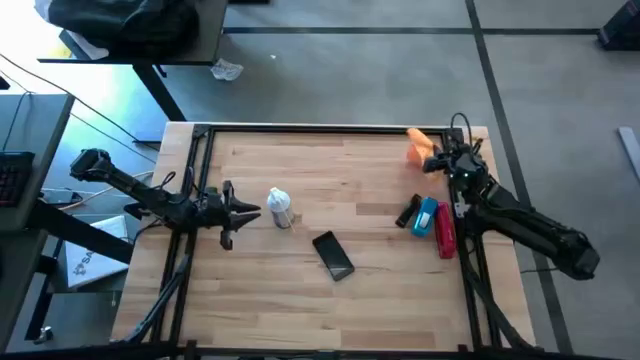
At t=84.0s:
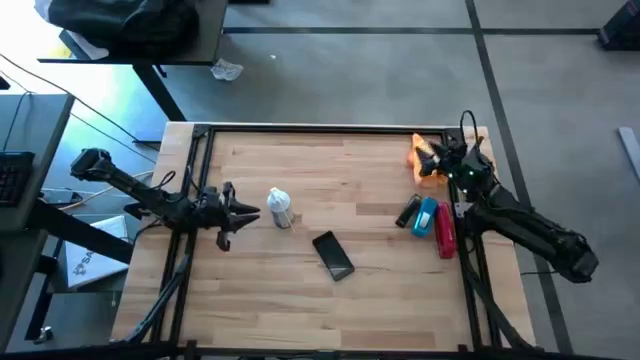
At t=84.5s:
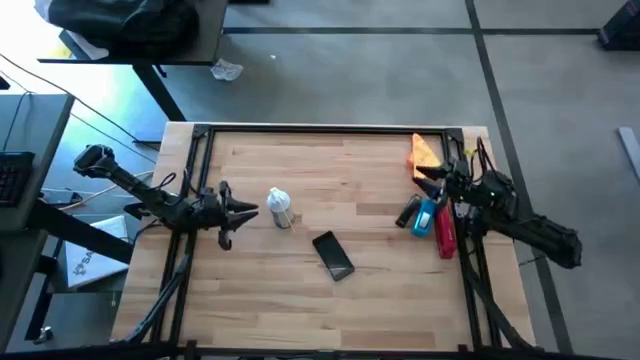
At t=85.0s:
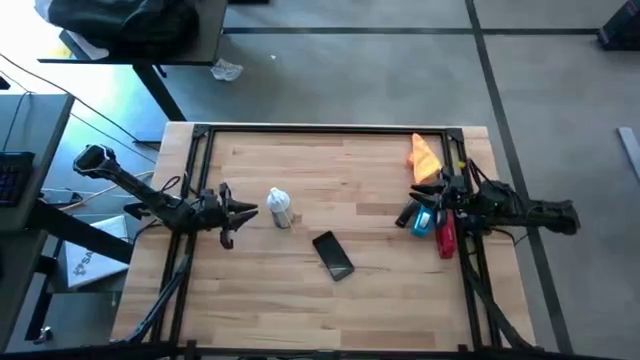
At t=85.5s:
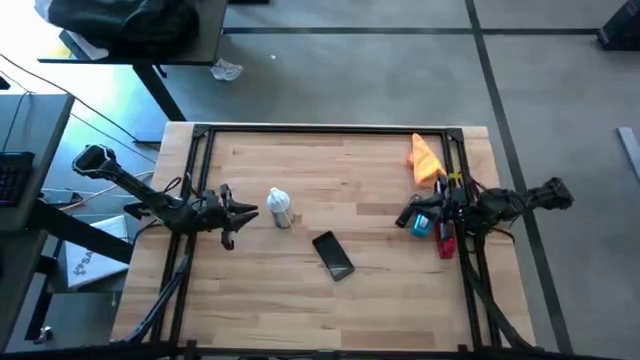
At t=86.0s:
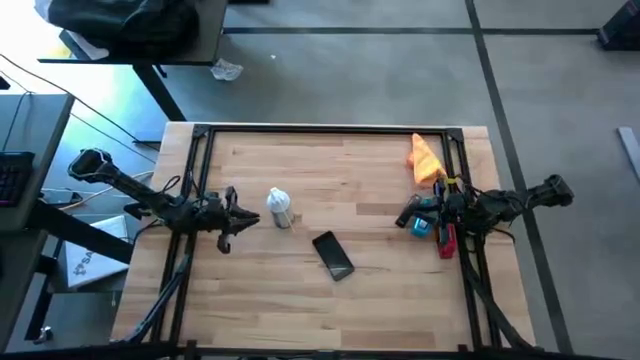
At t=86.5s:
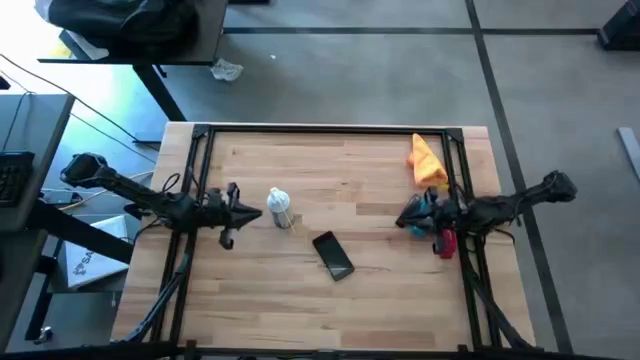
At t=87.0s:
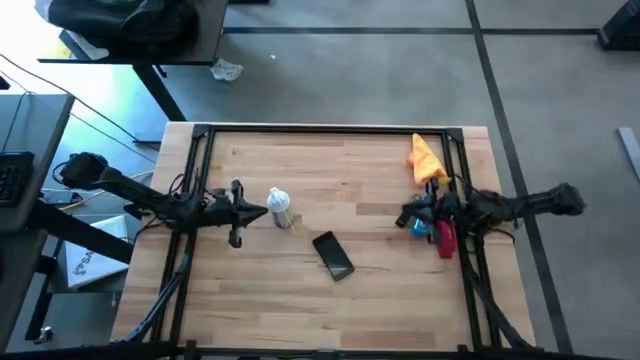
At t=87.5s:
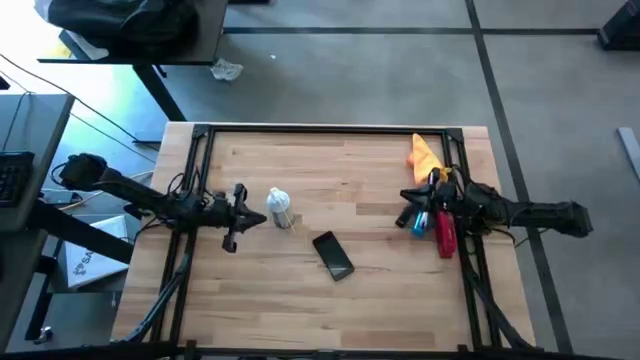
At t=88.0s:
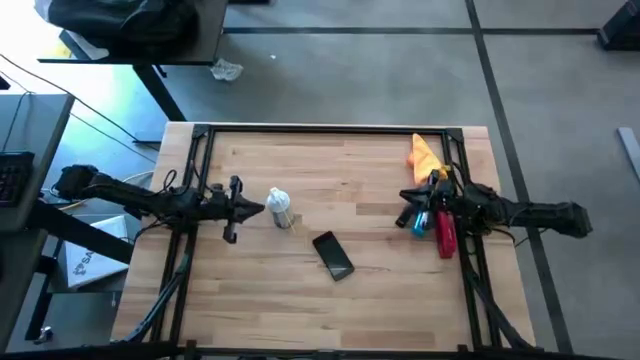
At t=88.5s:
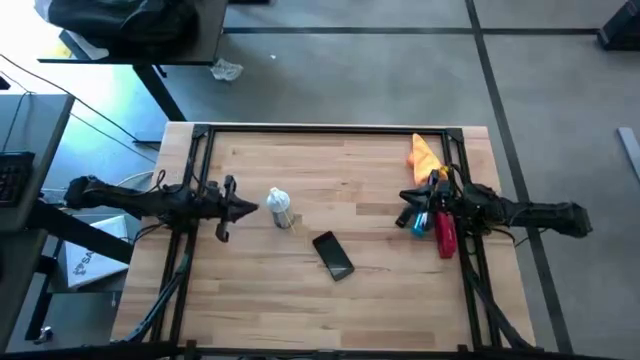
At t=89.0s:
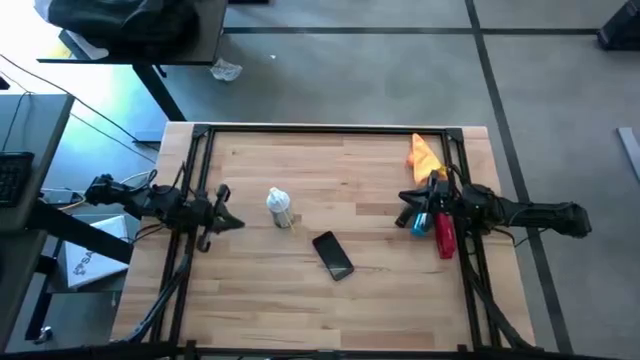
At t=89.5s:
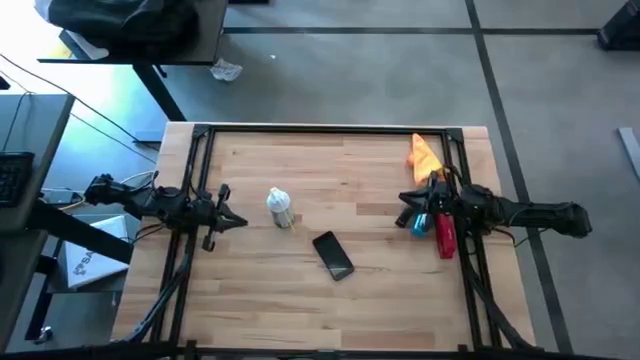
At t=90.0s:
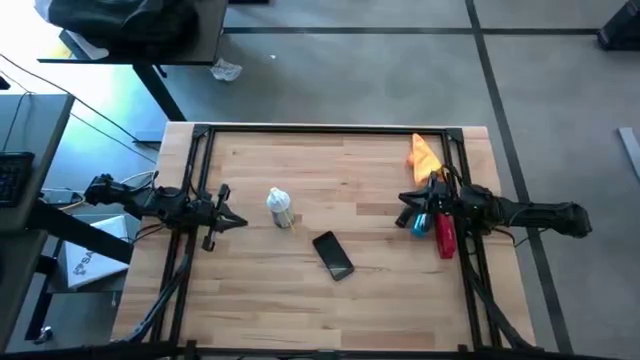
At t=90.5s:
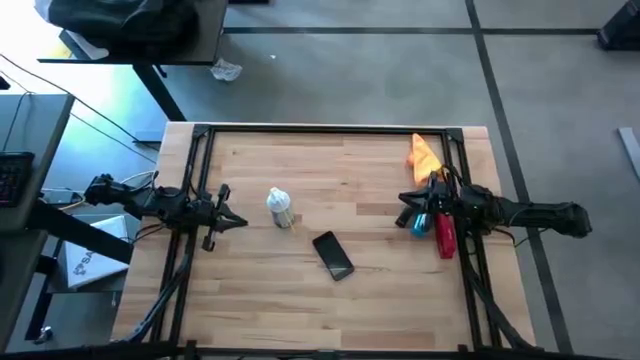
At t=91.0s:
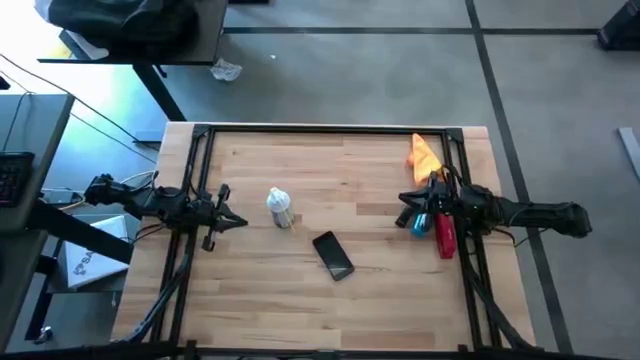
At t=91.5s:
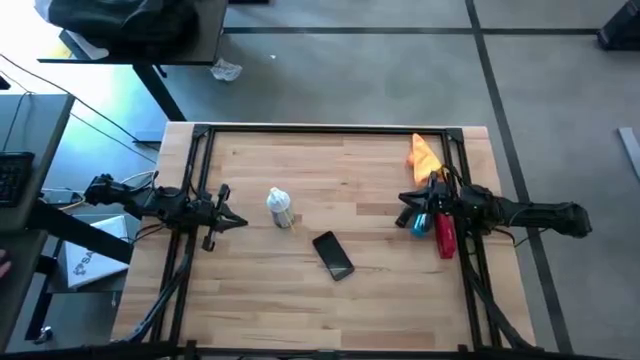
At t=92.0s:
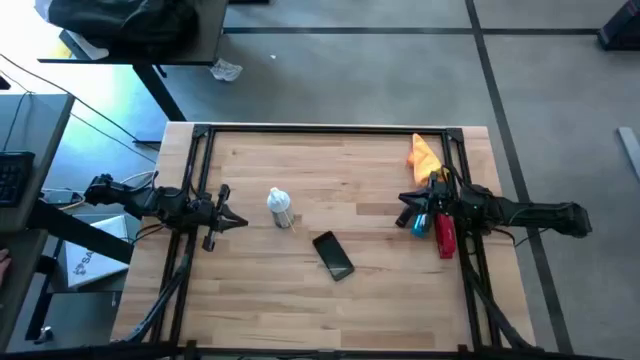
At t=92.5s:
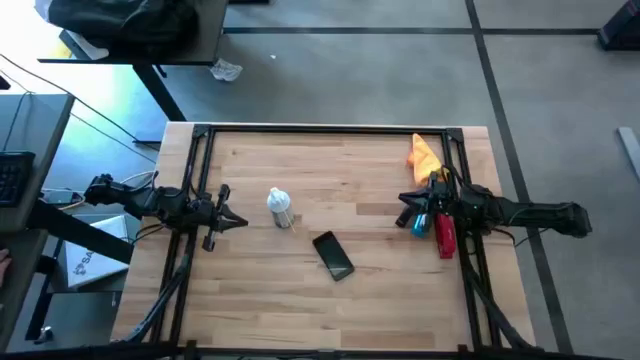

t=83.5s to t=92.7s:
Task: Apply microfiber cloth
Return to Home Position

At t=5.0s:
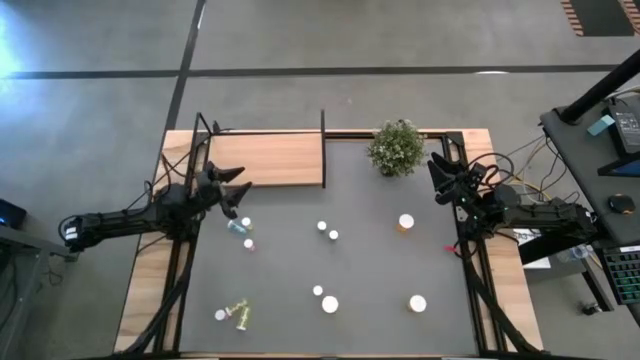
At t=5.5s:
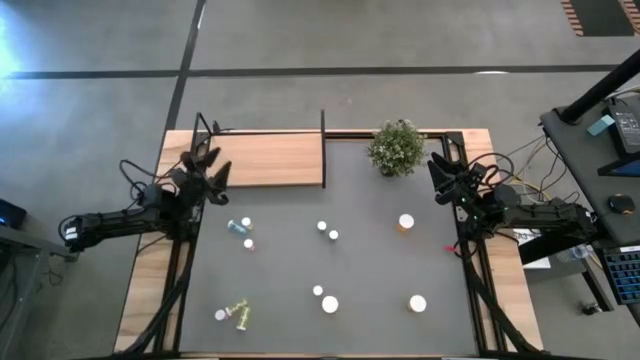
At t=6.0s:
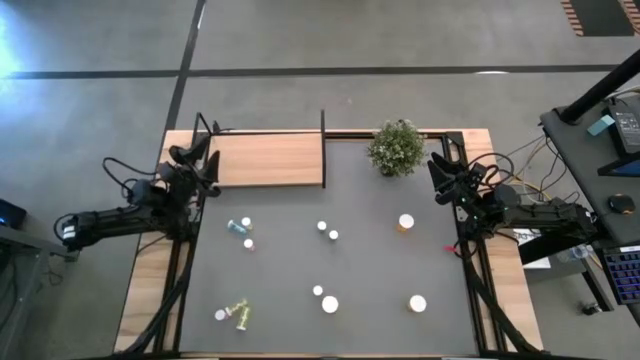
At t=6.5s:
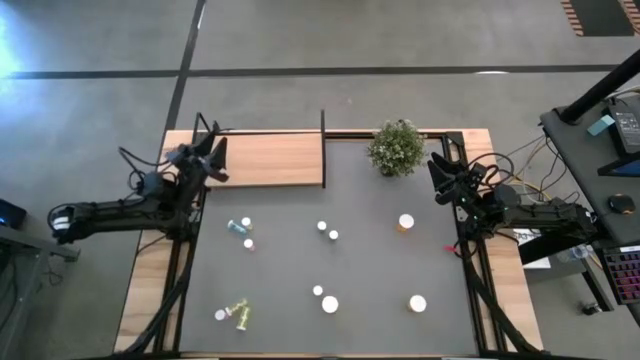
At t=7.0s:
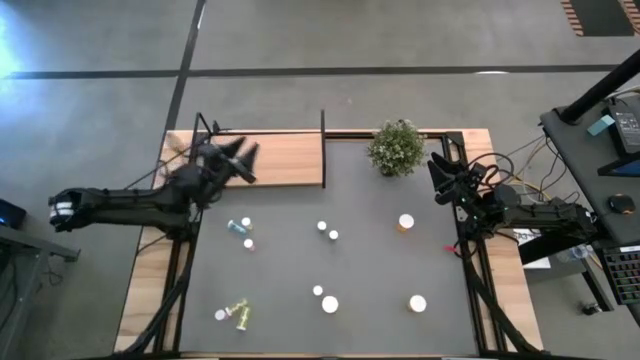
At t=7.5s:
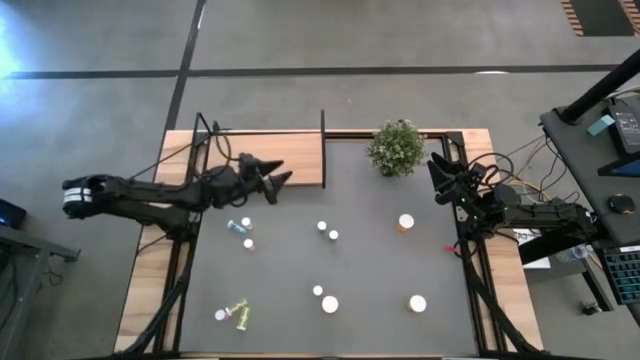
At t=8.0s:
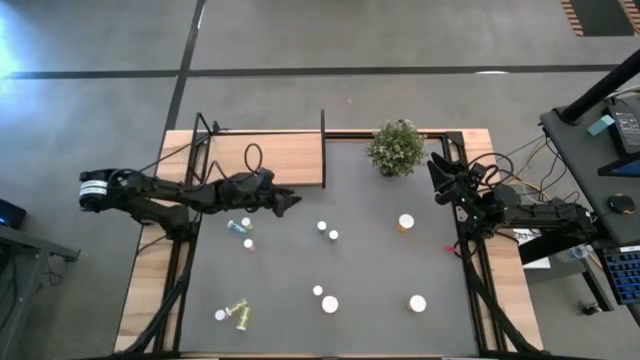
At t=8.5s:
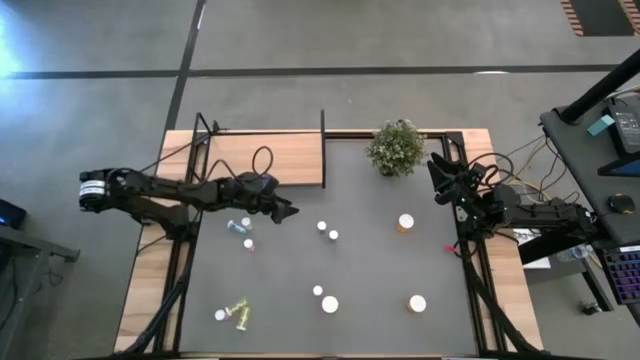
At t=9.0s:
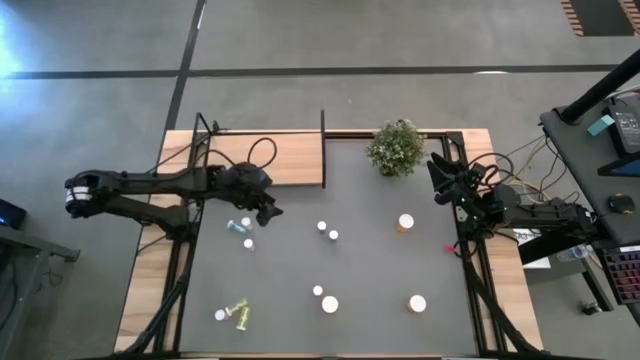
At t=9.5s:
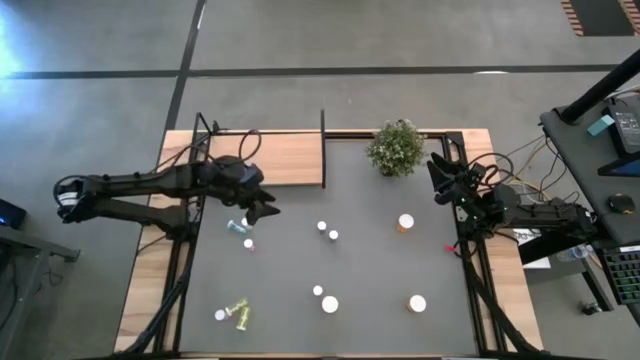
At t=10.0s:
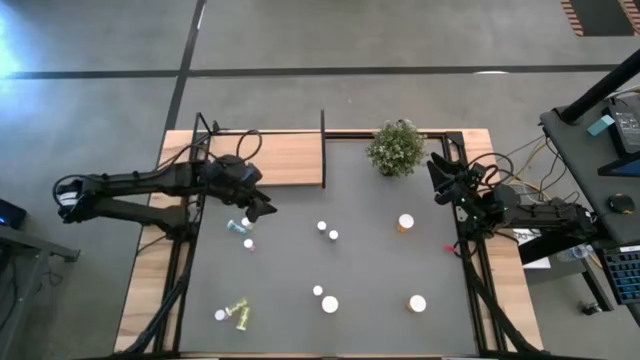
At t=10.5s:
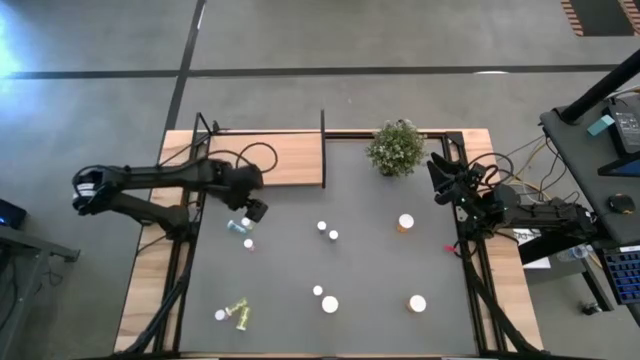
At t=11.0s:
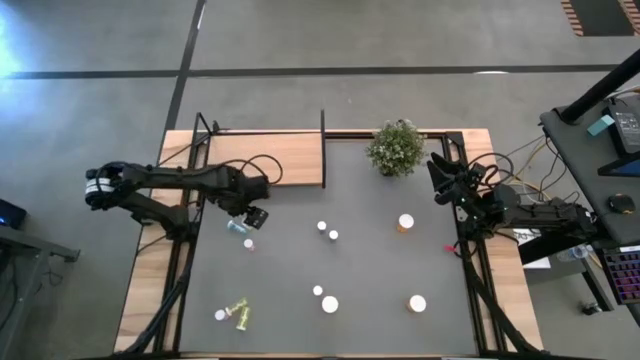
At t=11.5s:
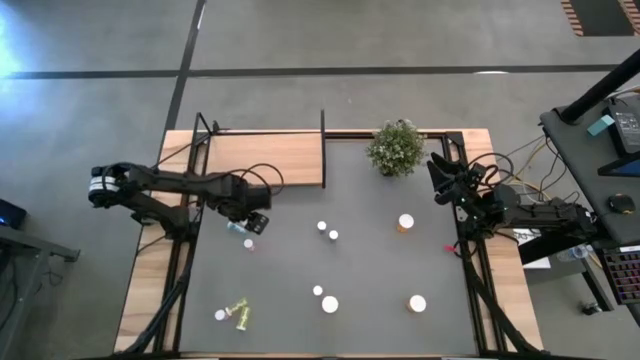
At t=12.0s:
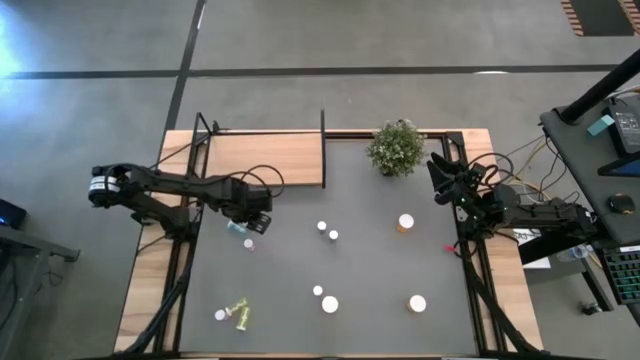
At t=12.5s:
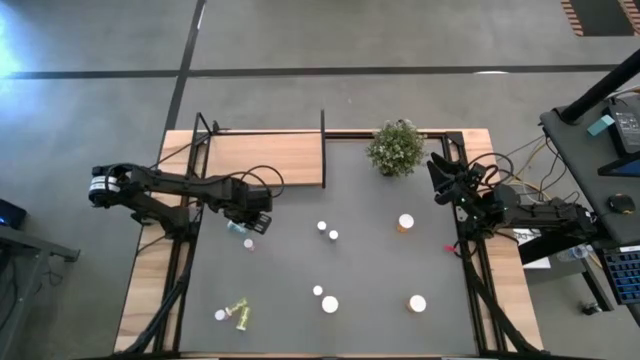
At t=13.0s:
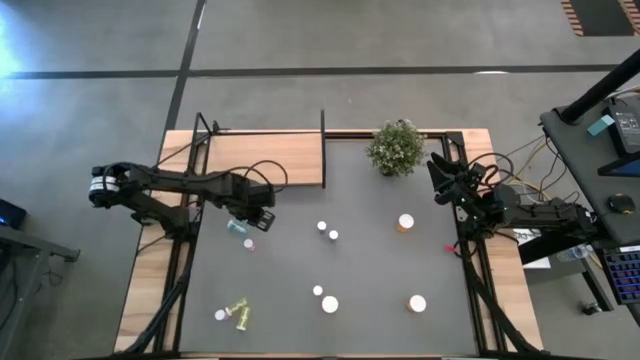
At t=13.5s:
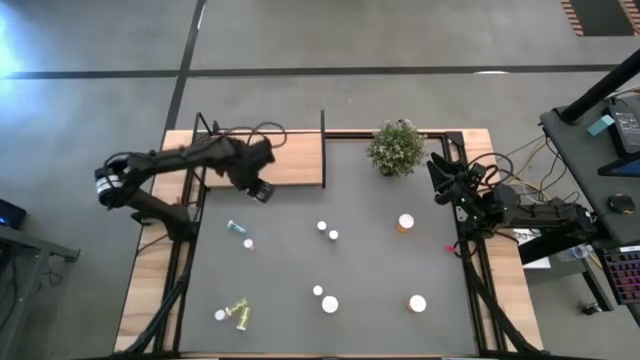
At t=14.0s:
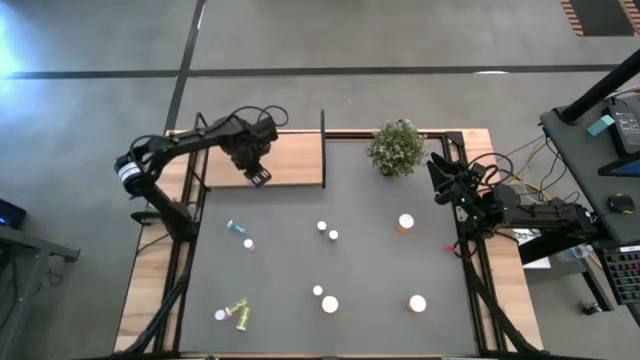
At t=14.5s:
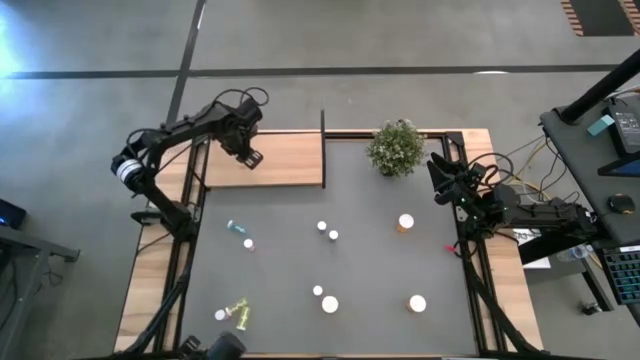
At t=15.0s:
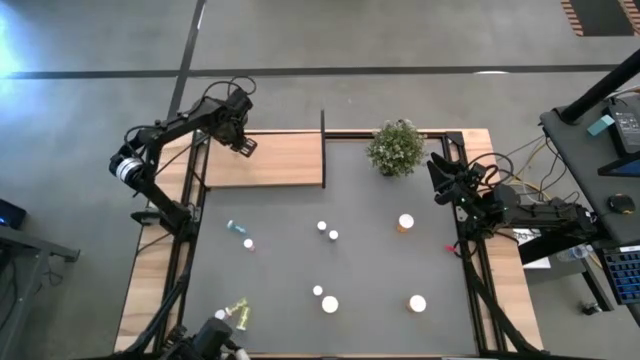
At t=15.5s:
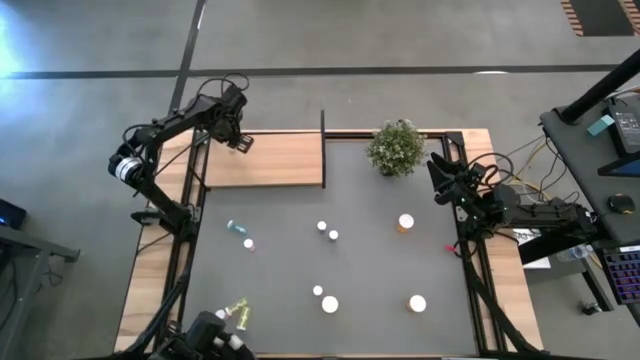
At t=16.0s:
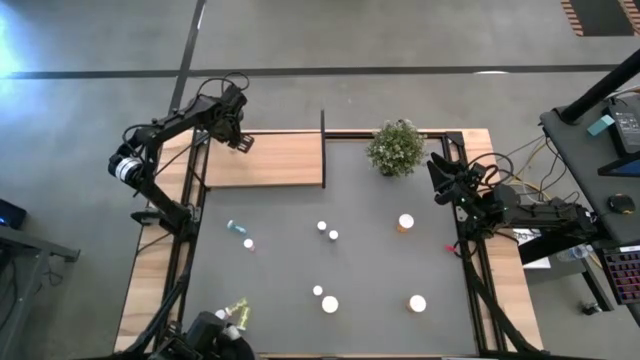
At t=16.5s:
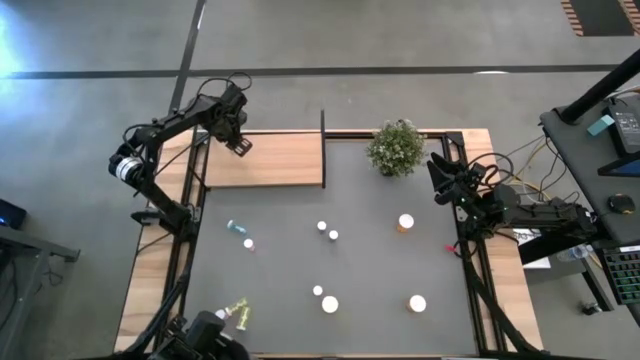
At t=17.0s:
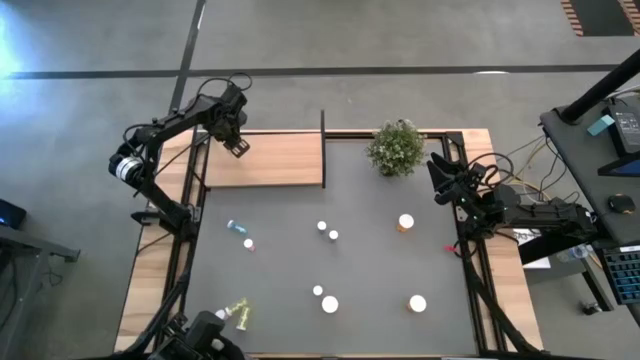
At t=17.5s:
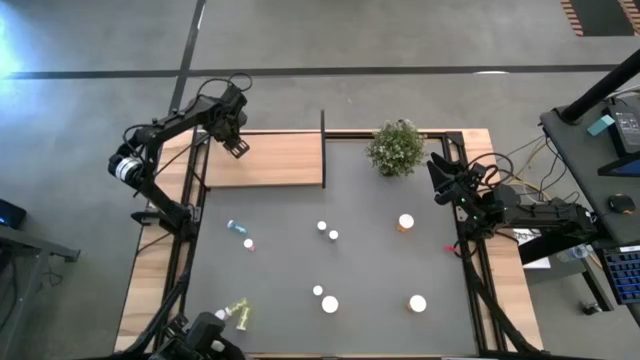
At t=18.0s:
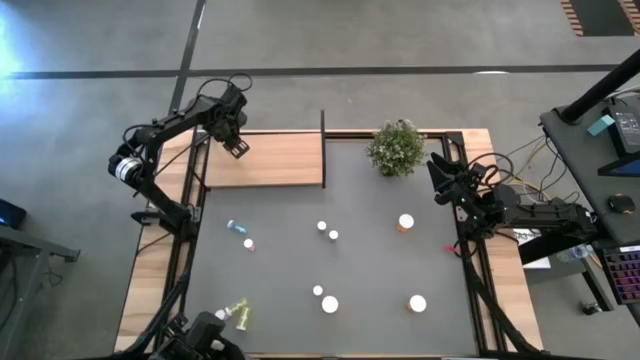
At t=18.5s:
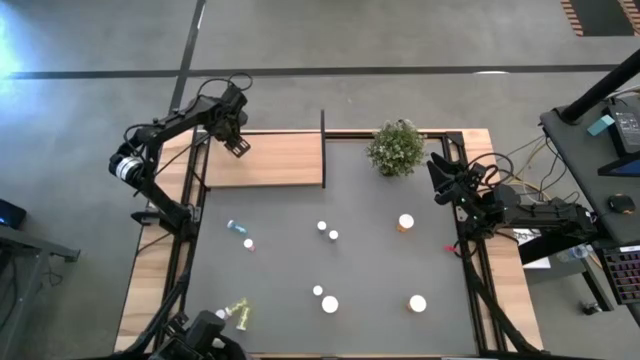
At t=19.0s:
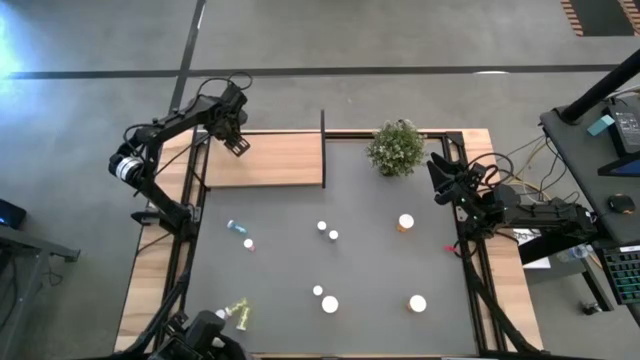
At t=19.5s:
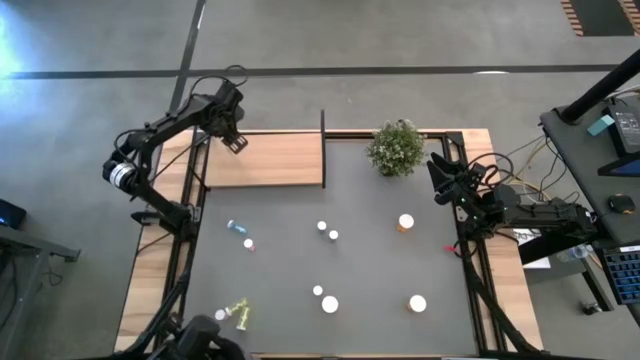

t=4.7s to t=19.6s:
Task: Pick and place medicine bottles onto shelf by color
Put the top yellow pill bottle on the shelf
